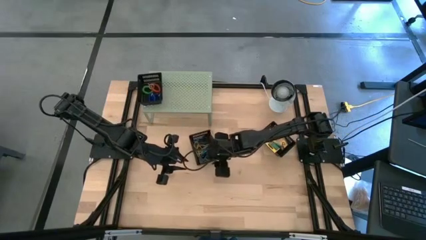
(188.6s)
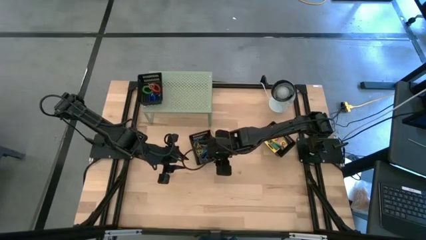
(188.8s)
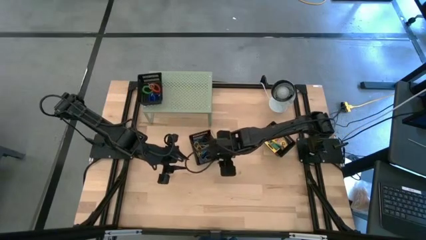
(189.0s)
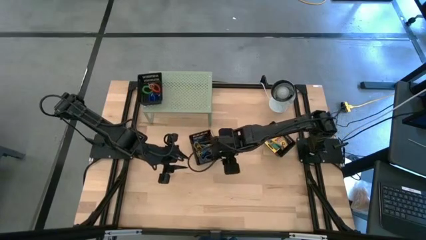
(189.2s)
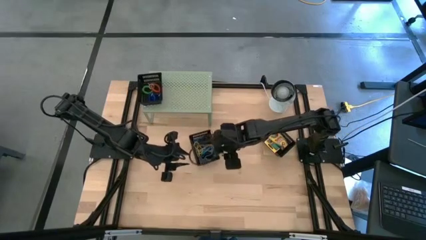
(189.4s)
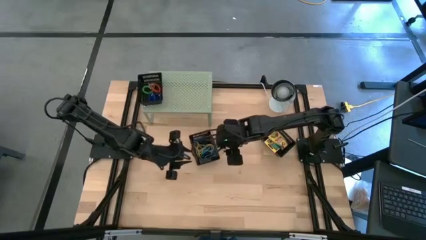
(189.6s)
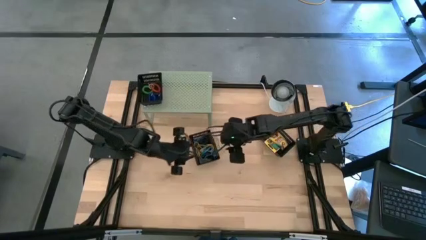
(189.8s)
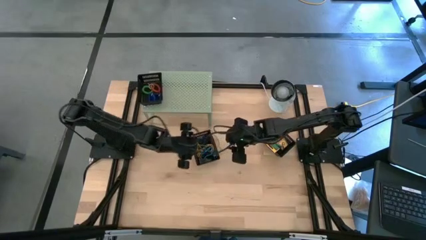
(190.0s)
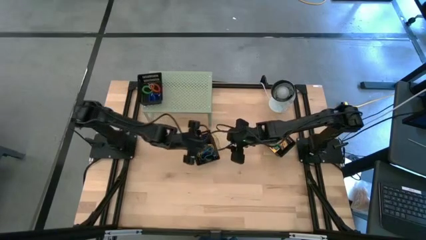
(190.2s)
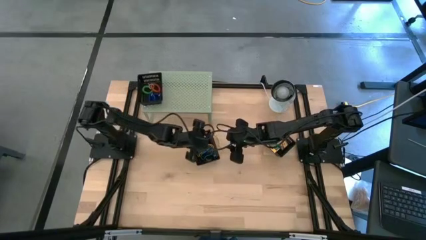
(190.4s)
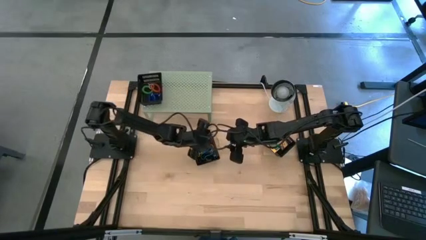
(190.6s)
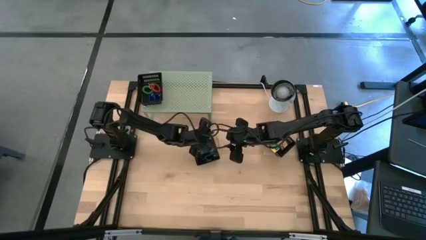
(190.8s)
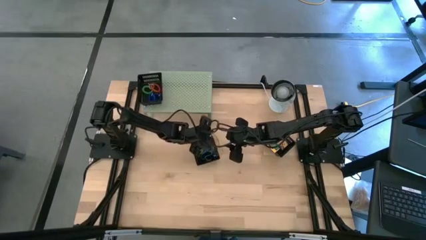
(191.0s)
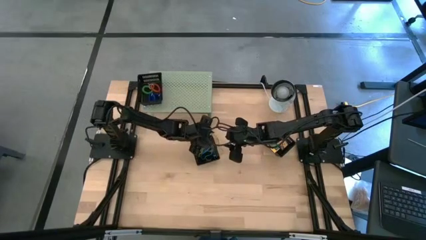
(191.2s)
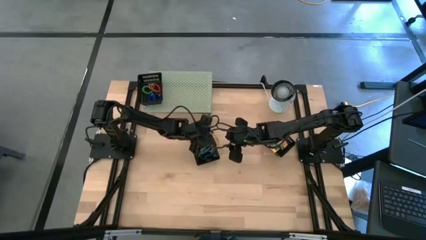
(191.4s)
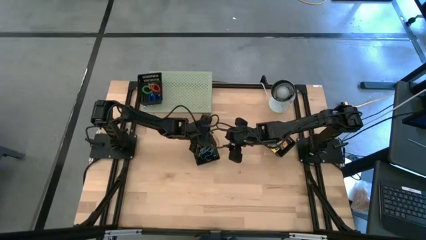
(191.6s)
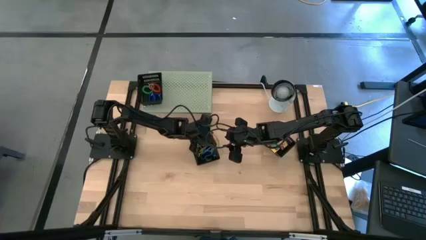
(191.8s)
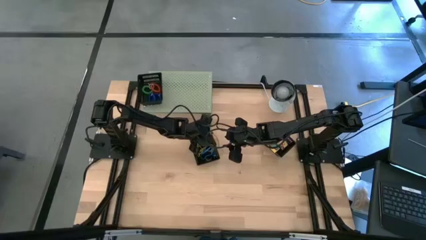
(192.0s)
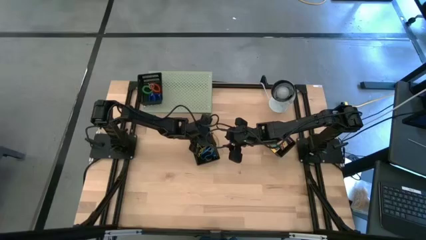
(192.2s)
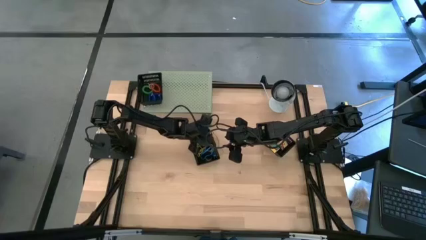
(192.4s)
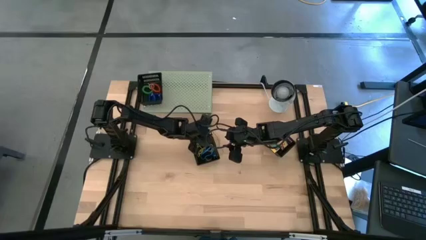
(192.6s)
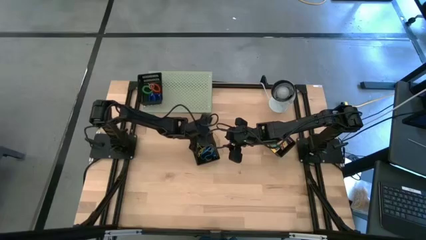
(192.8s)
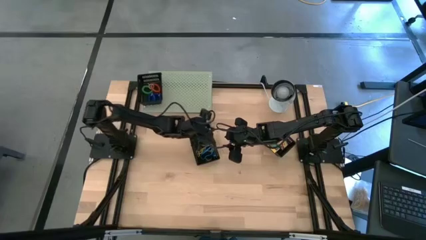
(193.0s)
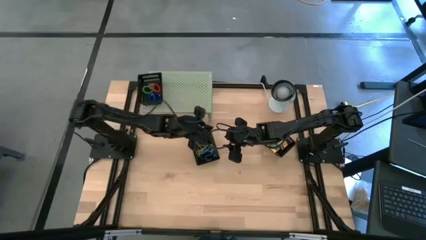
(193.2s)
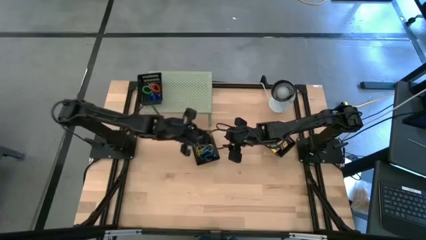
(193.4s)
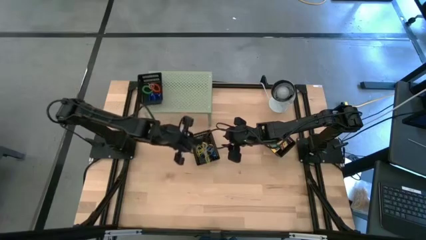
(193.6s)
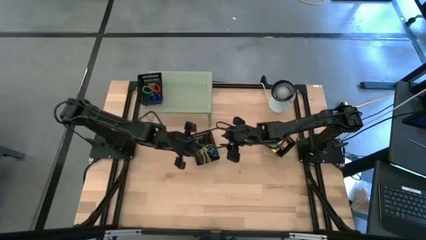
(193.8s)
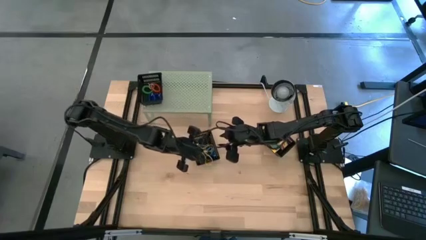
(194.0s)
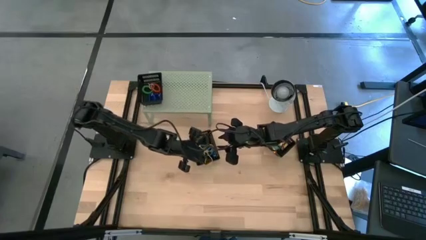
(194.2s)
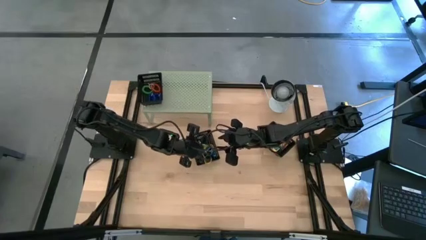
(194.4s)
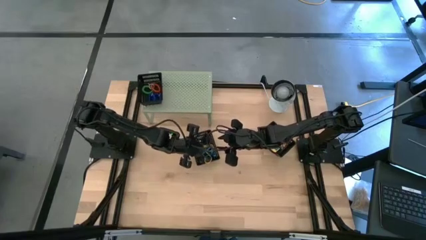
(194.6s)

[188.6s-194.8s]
Task: Pick & Place Office Desk Supplies
Put the yellow rubber band into the left black bin

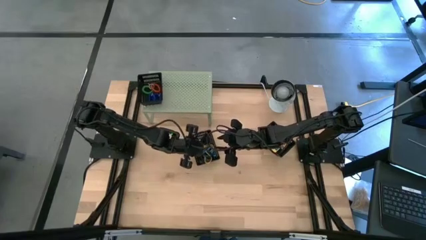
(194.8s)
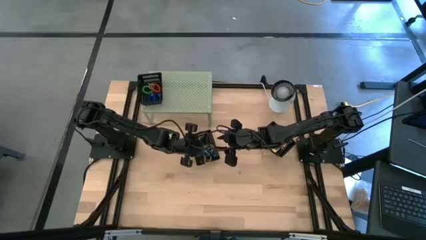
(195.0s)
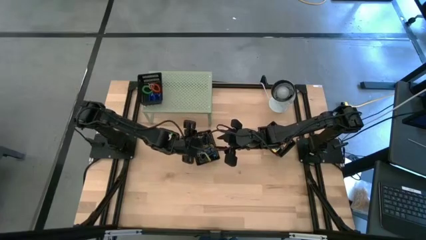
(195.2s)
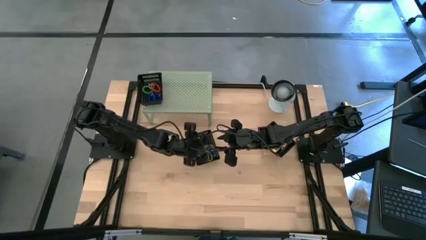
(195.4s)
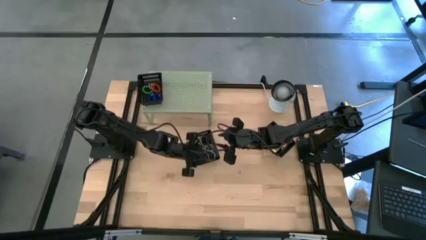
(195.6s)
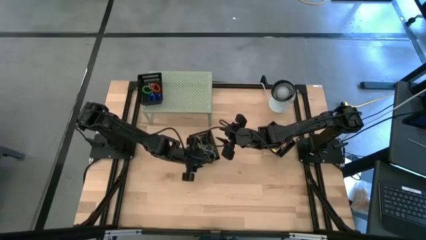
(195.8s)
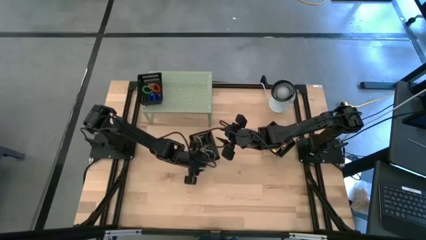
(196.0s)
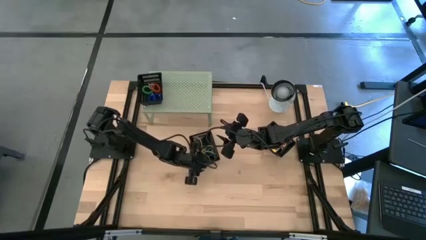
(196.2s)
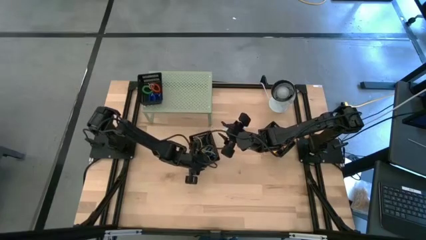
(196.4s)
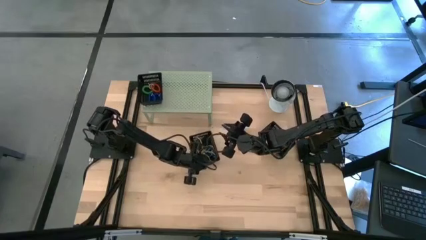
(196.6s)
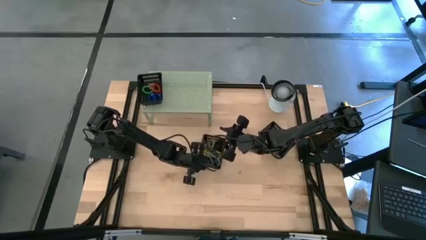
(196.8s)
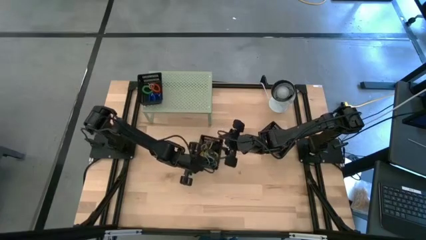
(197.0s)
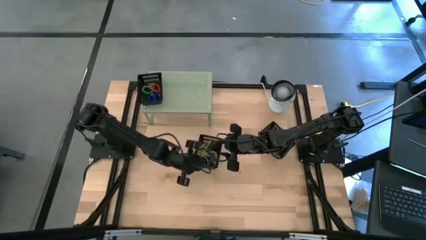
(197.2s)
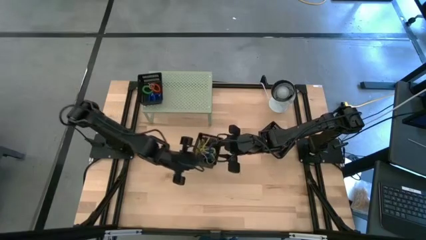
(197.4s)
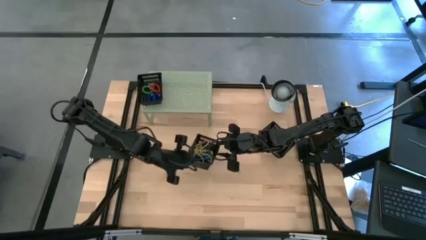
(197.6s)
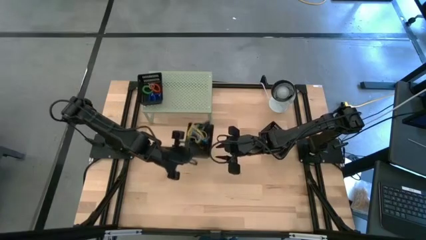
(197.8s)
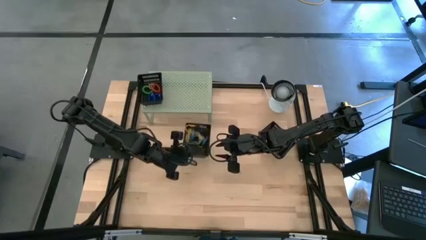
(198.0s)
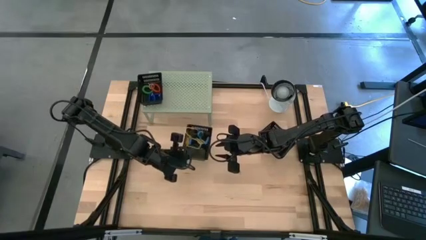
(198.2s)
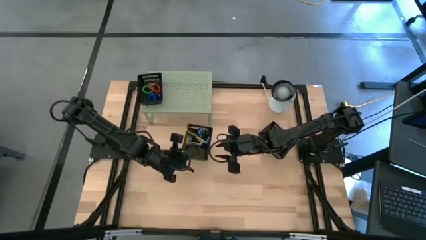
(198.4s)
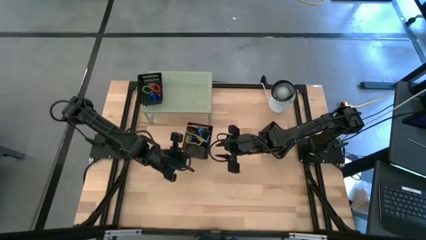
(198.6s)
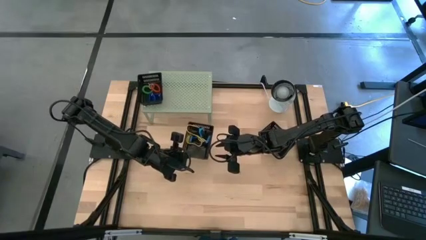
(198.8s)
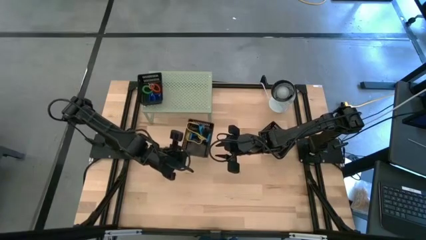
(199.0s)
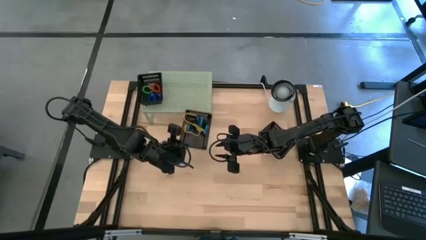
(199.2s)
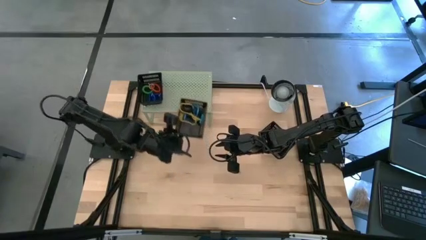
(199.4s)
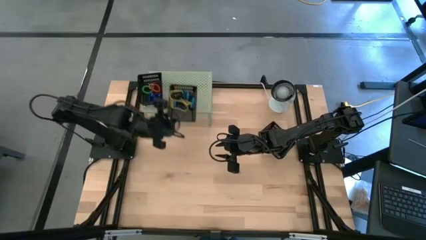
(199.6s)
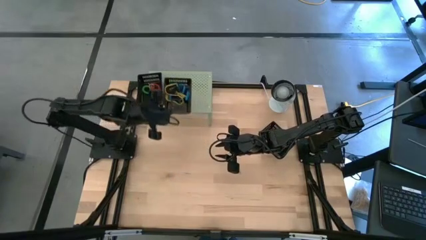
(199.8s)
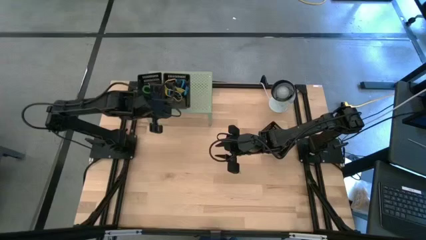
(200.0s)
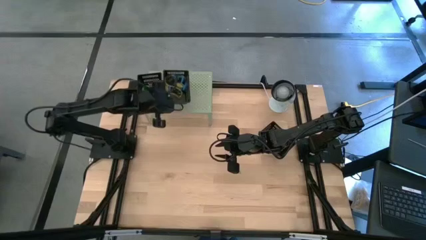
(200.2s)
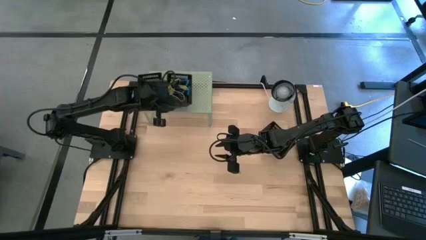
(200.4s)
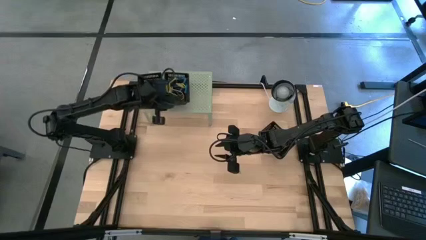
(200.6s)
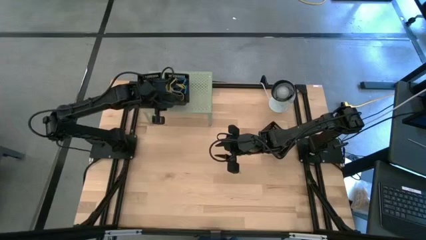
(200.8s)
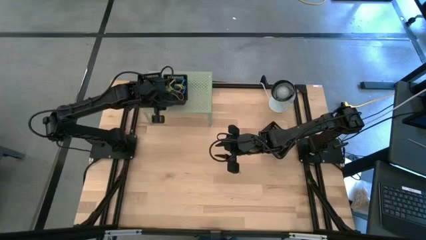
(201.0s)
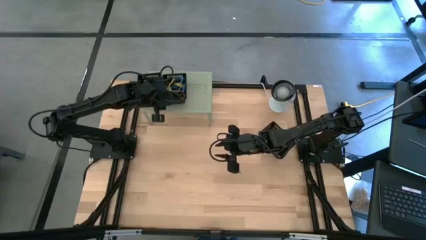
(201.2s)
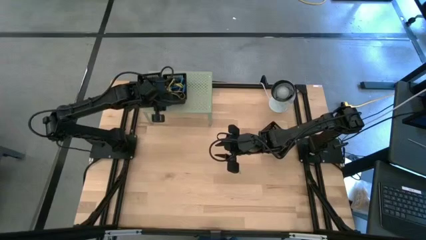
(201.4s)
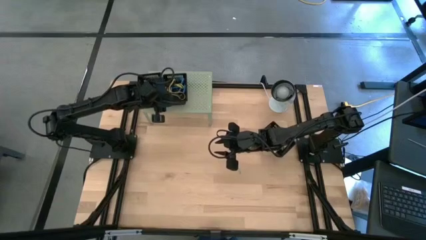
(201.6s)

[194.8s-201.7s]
Put the left black bin on the shelf

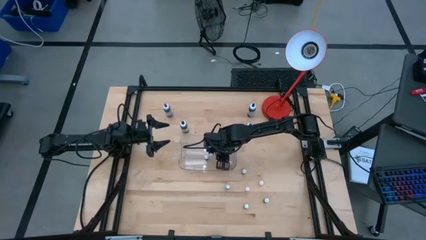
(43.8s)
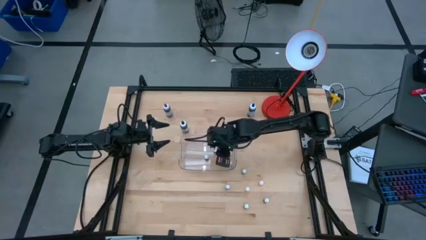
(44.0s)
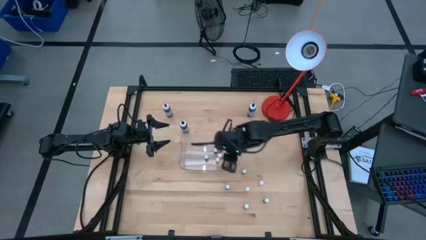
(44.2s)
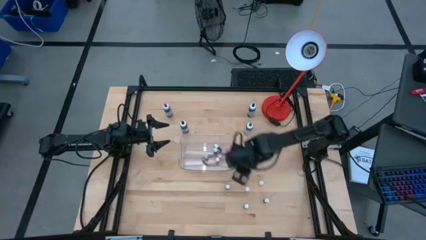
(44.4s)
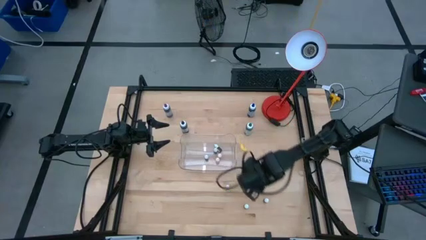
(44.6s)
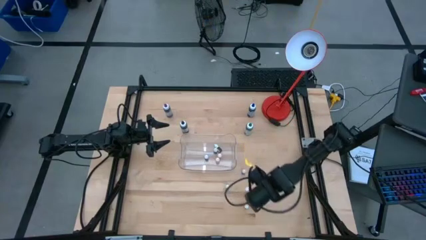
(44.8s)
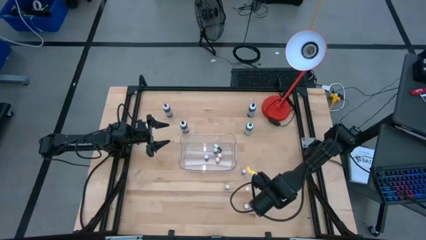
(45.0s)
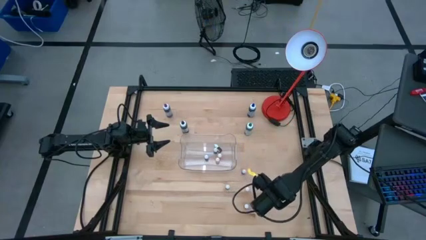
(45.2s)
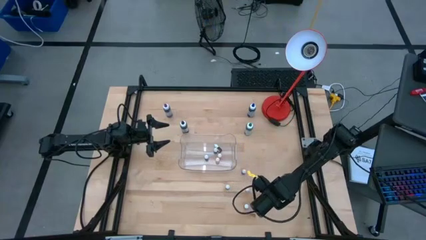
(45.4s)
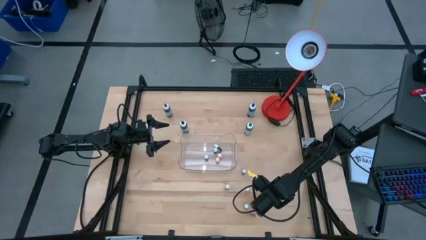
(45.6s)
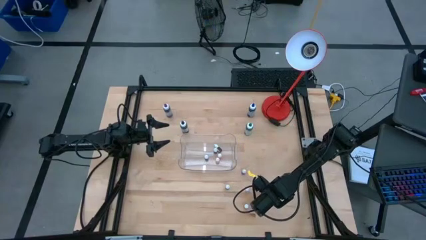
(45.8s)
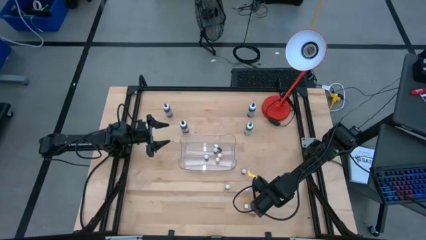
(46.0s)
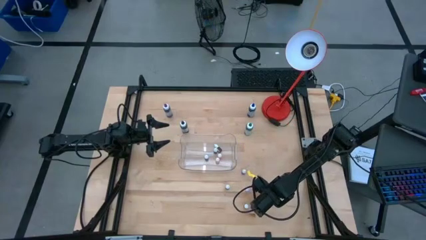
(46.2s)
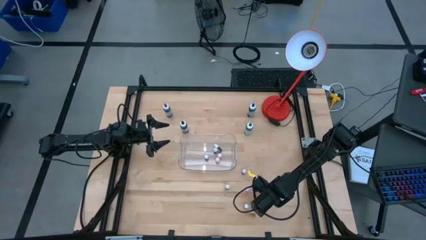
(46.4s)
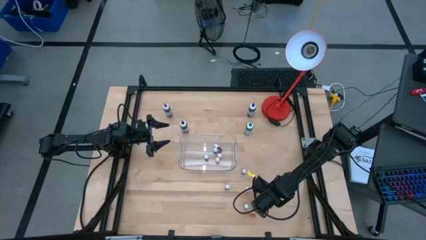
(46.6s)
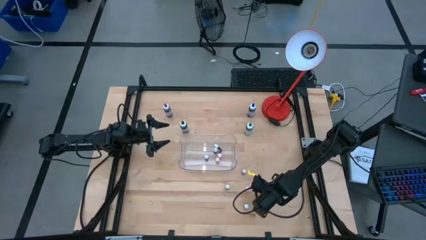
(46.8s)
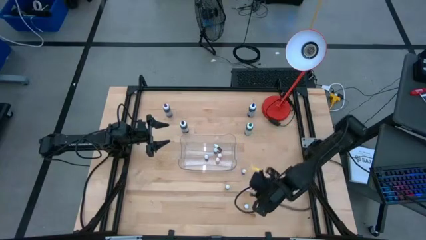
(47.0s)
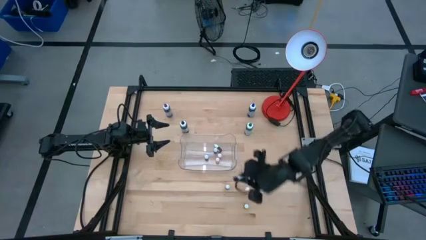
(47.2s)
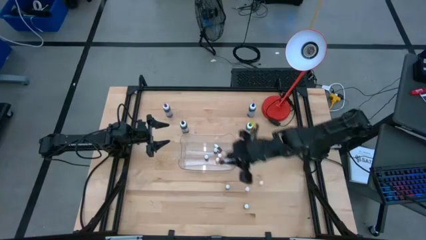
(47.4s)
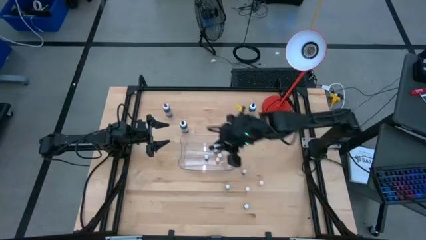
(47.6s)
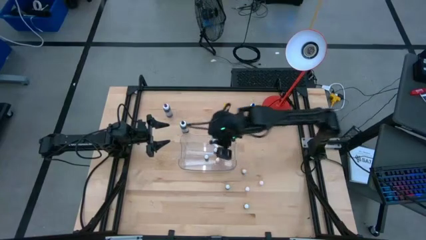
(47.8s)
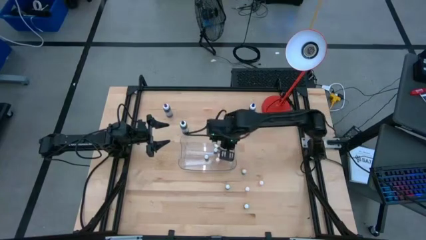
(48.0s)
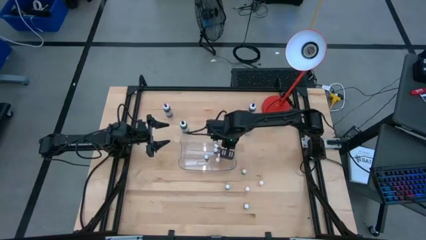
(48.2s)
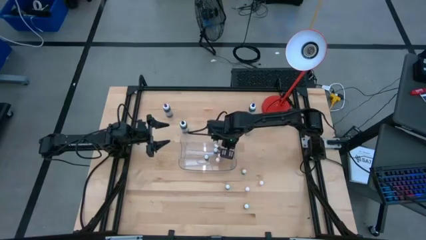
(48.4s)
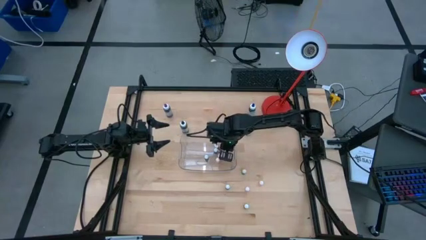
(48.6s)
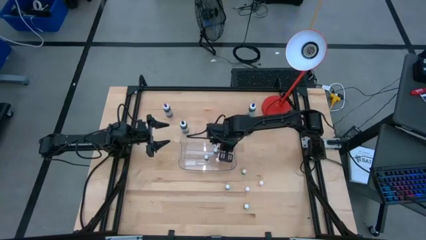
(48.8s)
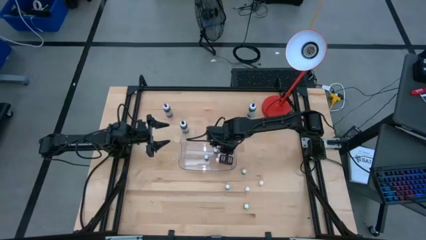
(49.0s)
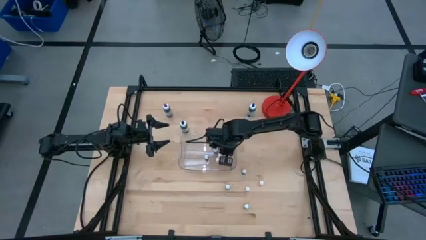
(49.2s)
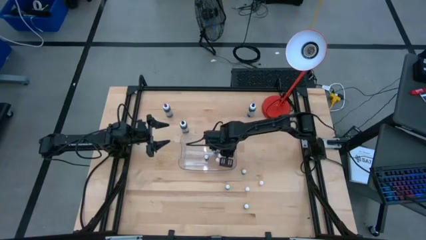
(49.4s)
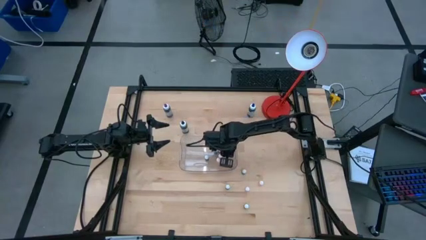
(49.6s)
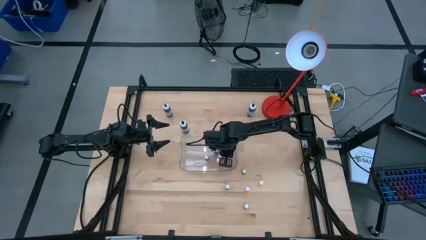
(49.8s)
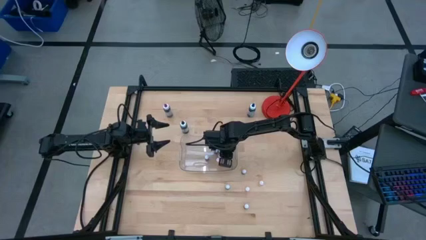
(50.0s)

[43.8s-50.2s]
Task: Pick & Place food coloring
Put the small black food coloring bottle into the transparent bin
